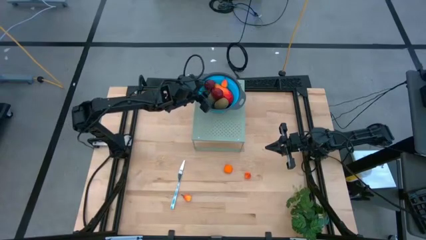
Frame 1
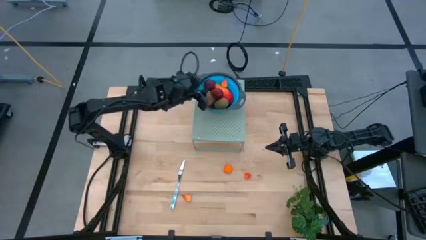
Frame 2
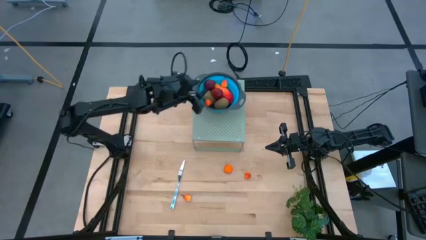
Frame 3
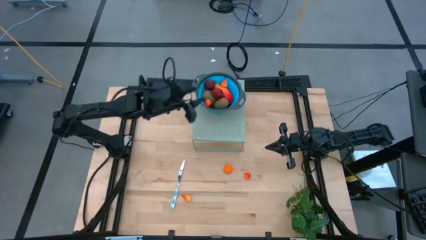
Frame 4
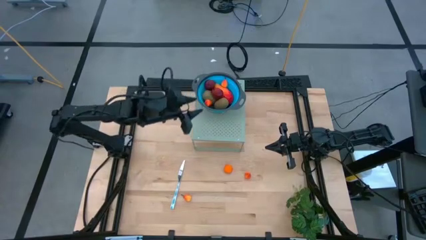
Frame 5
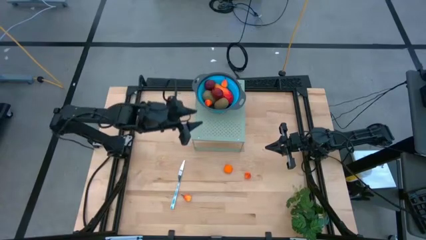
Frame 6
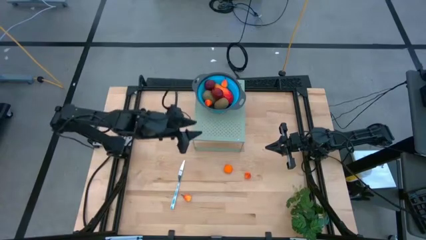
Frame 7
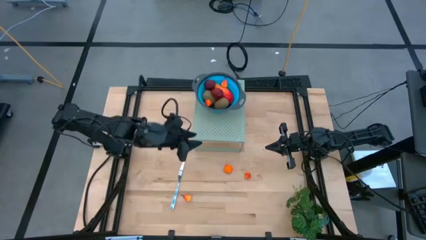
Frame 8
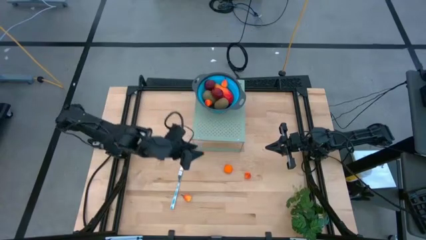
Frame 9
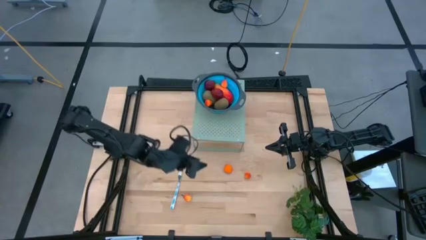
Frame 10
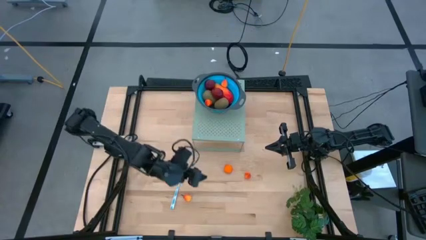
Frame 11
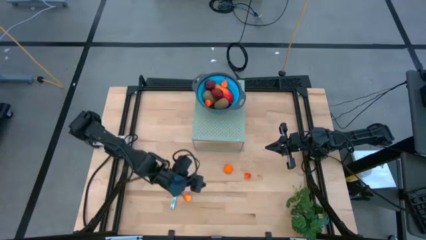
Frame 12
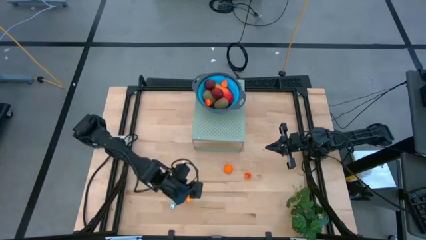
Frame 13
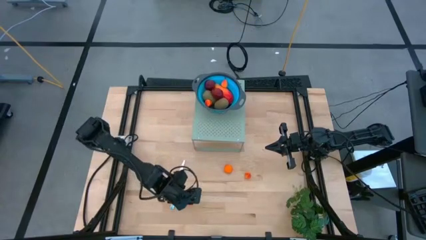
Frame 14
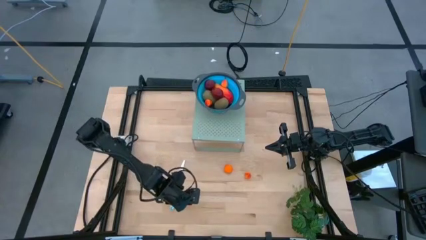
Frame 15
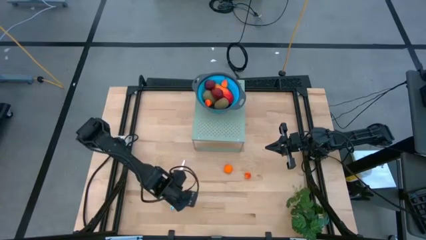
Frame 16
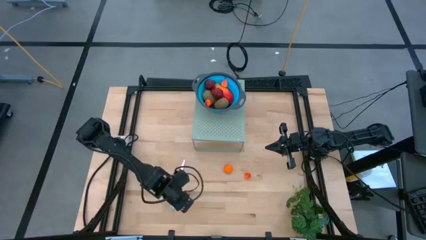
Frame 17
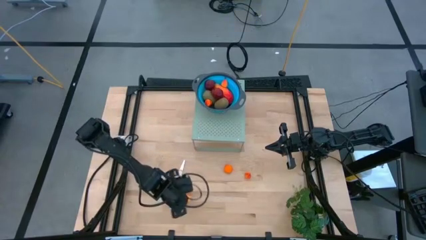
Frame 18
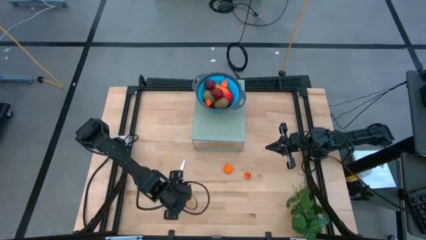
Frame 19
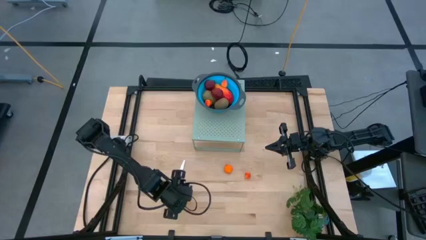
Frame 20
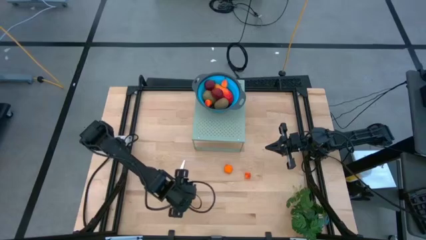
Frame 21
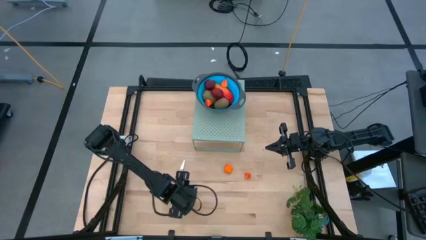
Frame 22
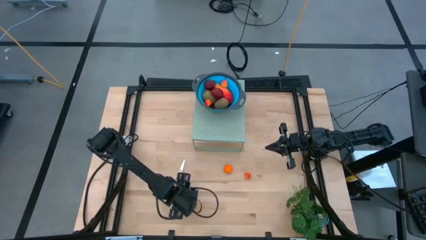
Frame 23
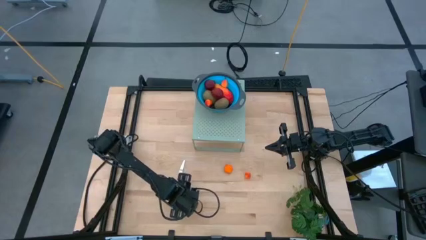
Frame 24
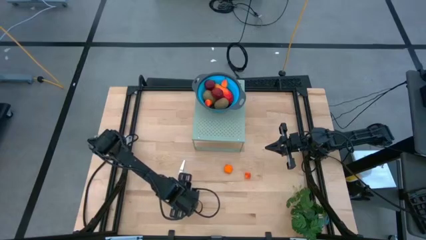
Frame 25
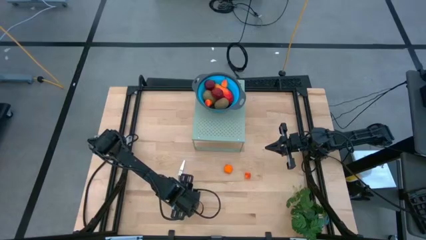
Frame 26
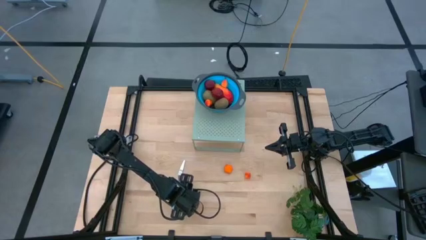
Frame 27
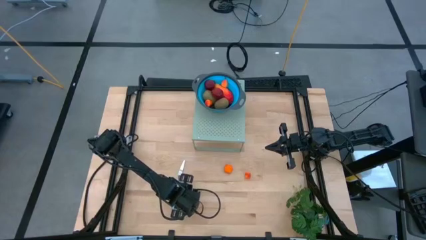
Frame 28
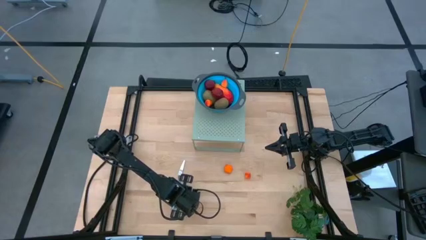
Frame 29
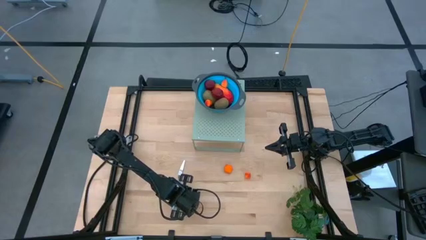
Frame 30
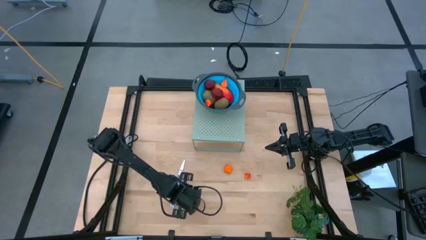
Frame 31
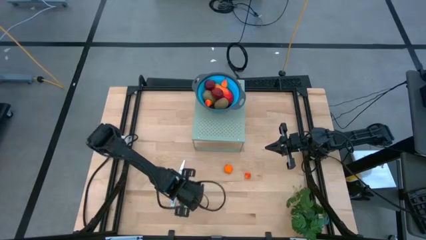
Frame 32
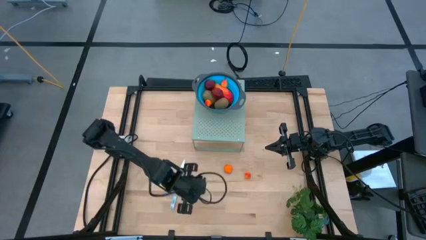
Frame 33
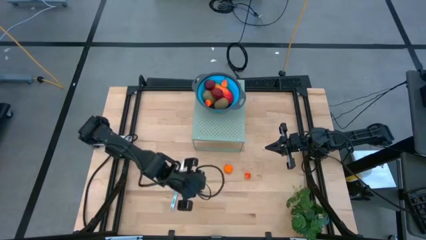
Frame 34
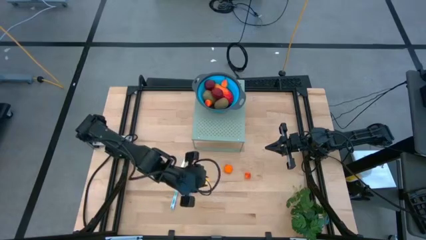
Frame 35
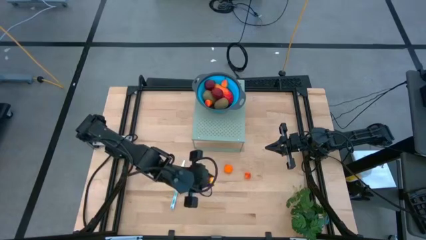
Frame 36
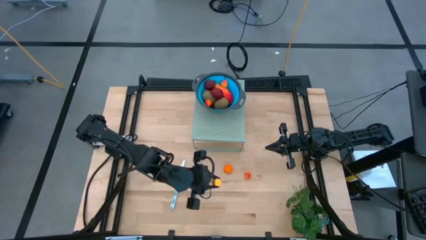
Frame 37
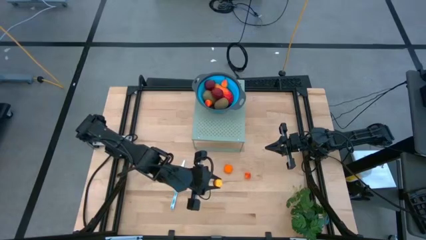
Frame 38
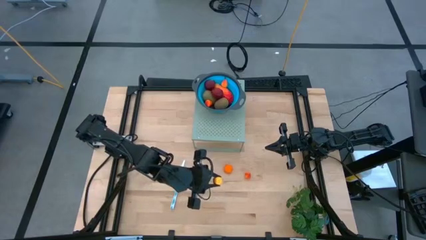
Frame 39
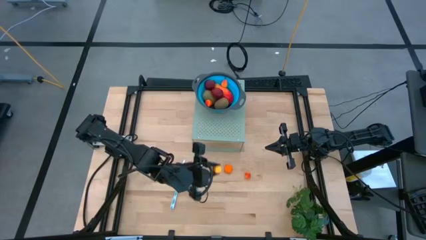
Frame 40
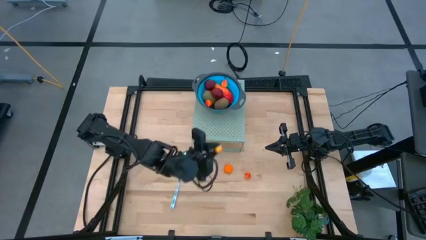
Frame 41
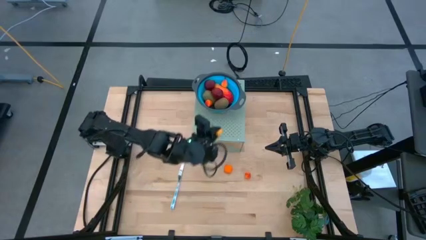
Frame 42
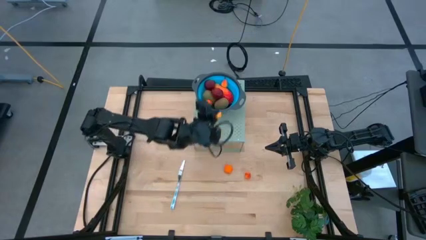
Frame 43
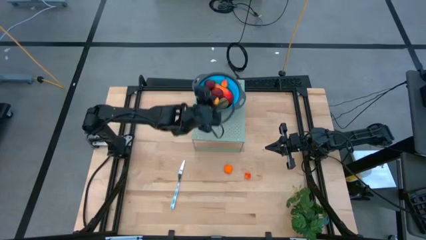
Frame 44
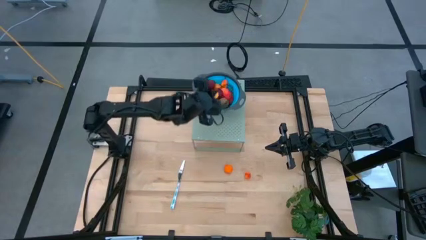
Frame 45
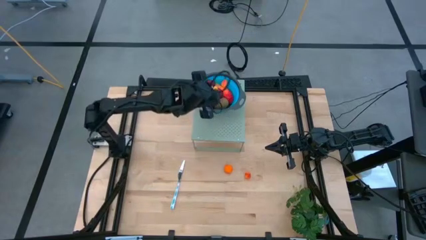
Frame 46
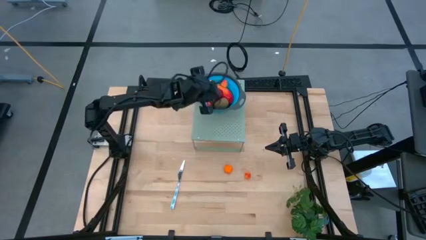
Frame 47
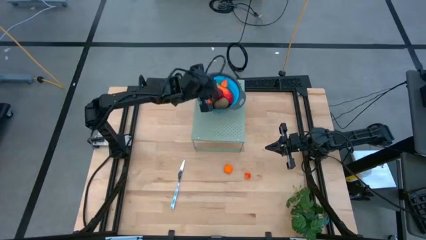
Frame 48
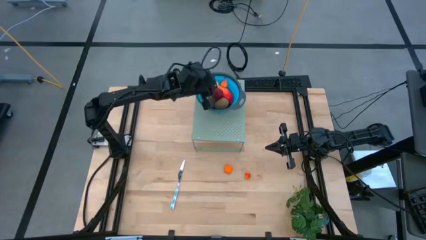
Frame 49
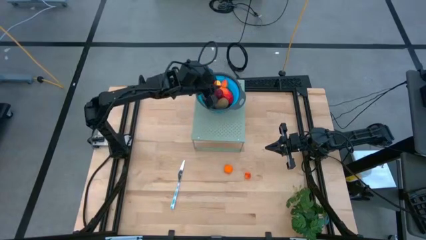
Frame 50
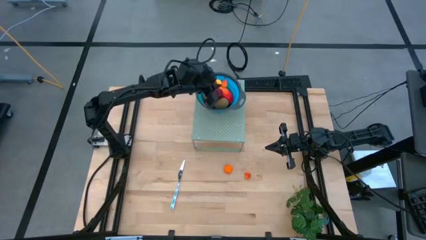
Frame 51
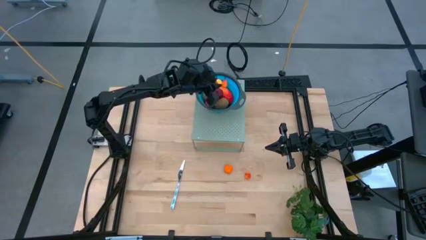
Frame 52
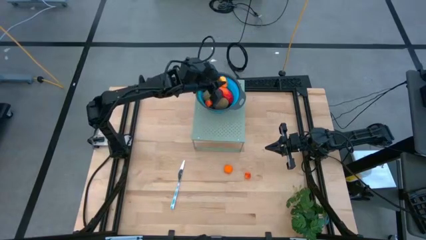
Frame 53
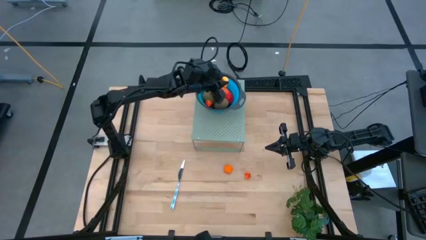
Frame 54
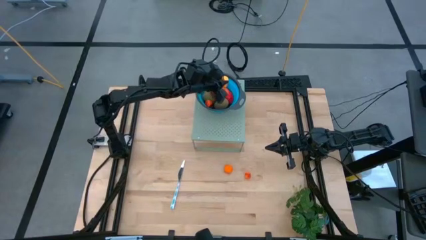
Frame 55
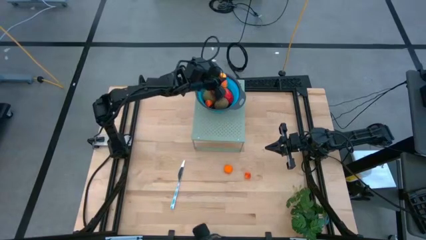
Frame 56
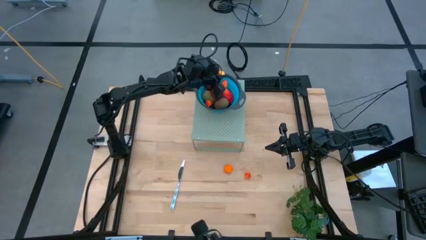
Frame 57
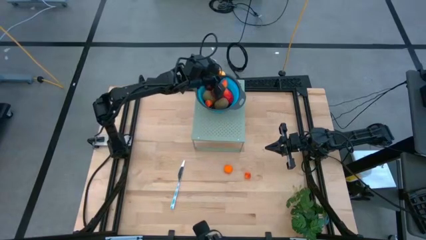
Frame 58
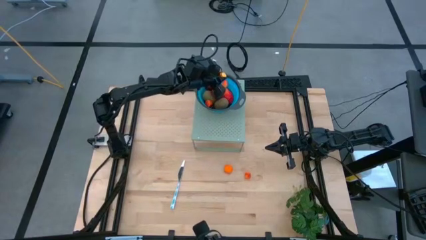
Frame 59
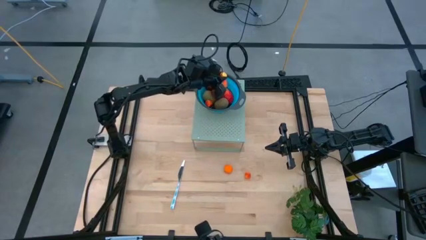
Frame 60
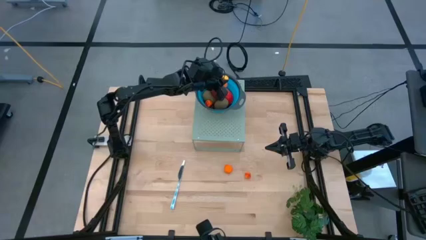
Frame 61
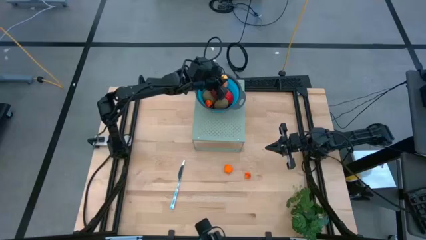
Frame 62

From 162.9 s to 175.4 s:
Task: Pick & Place Fruit
Put the left Peach into the blue strainer bowl on the shelf

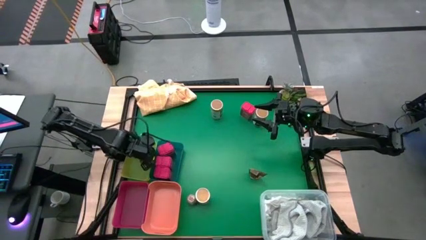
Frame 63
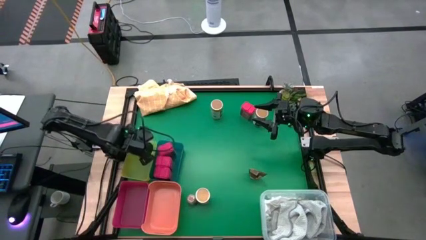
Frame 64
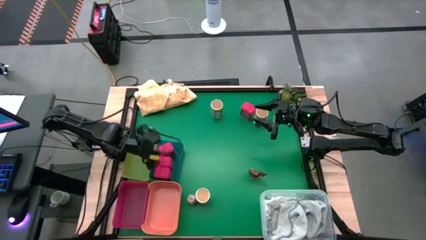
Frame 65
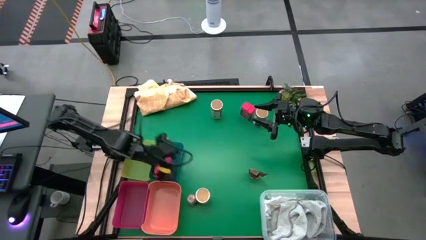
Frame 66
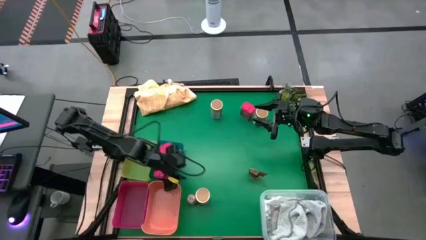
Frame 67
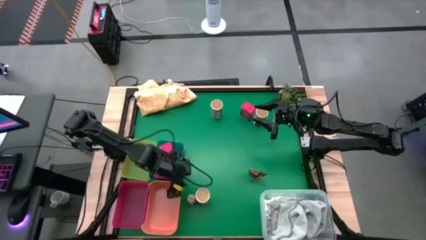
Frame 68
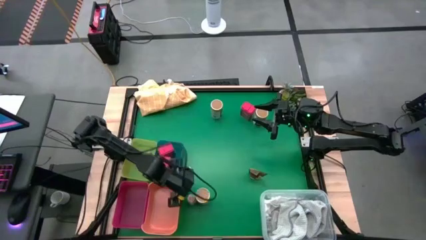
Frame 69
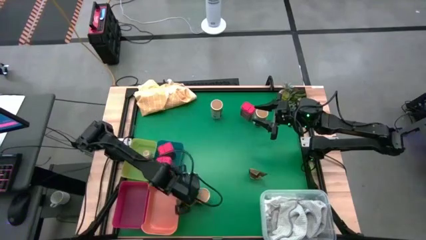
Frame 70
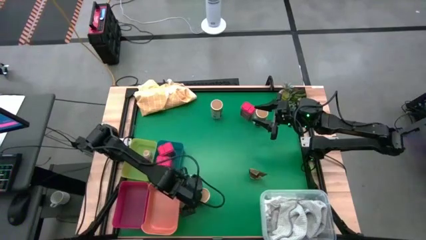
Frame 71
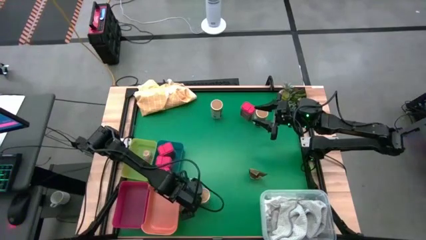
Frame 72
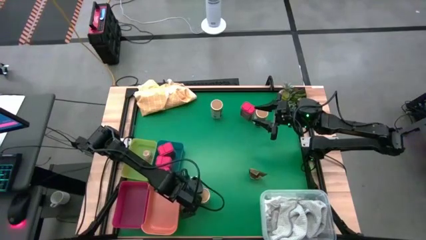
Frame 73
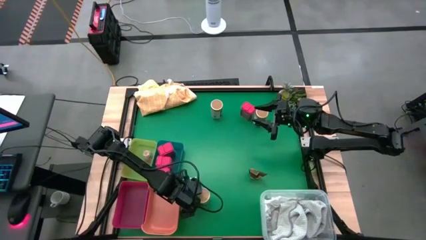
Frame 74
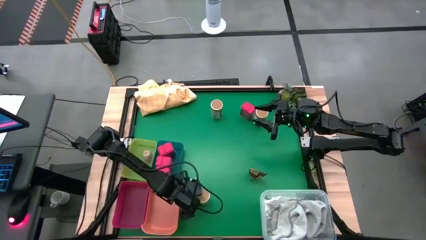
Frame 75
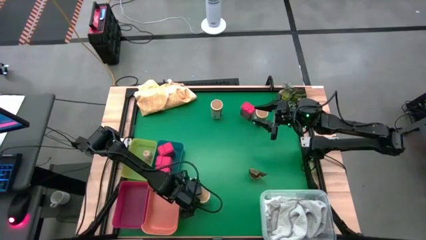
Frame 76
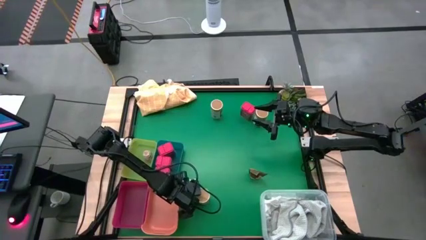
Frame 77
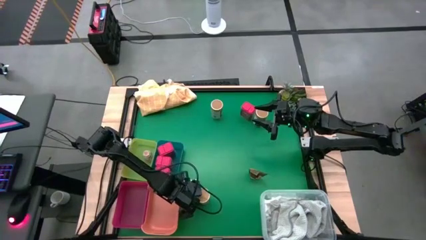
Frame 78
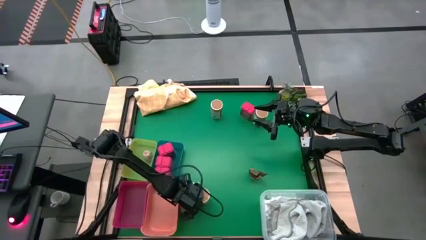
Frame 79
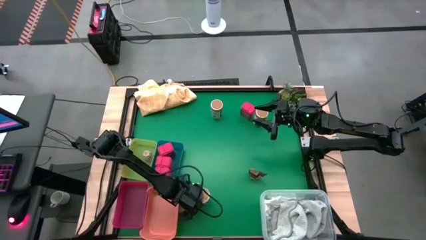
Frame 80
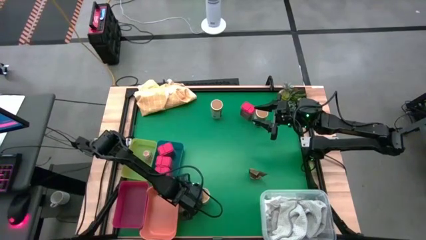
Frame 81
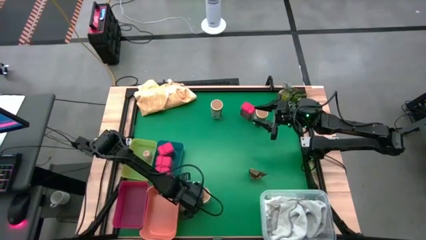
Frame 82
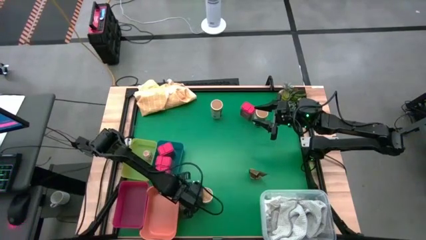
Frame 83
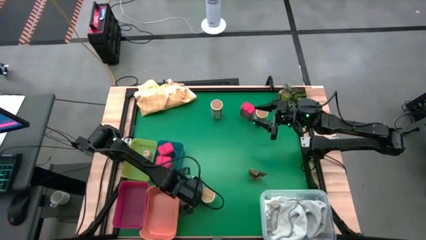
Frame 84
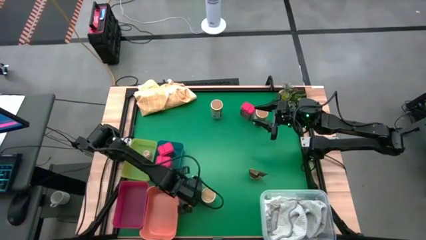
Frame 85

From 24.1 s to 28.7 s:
Task: Sort spices by type
Put the brown seasoning bottle into the yellow bin
